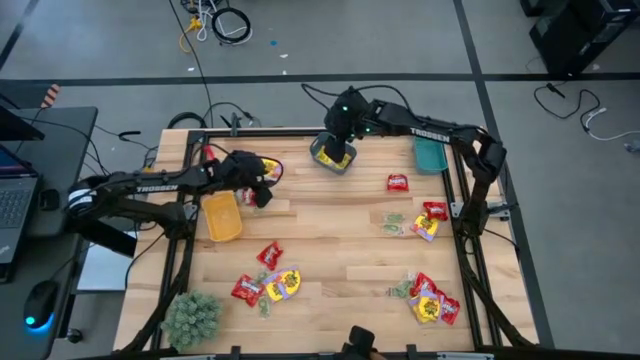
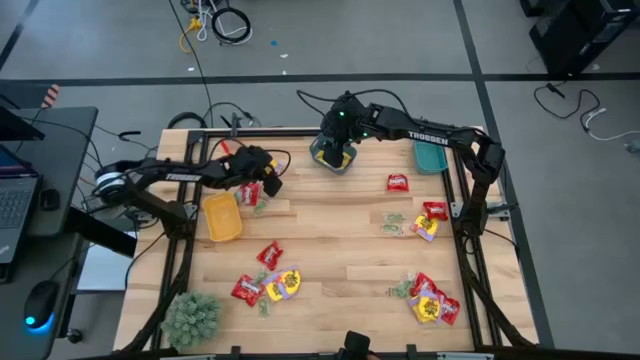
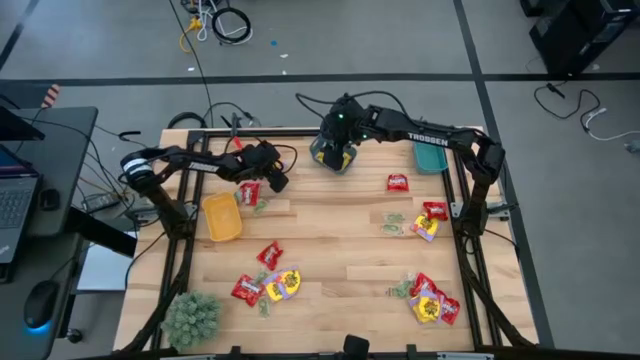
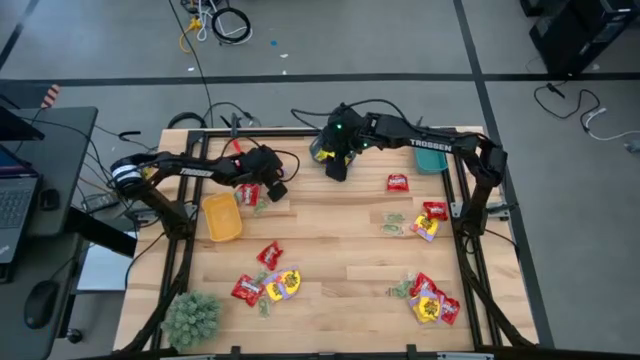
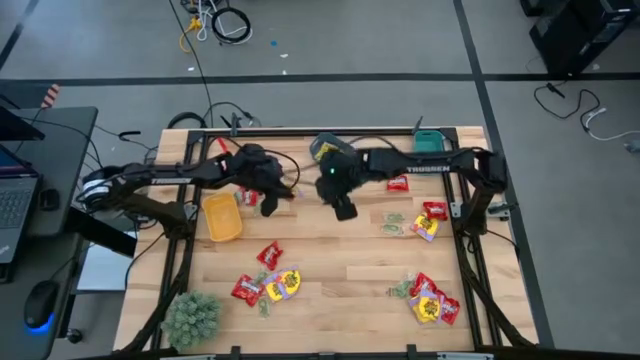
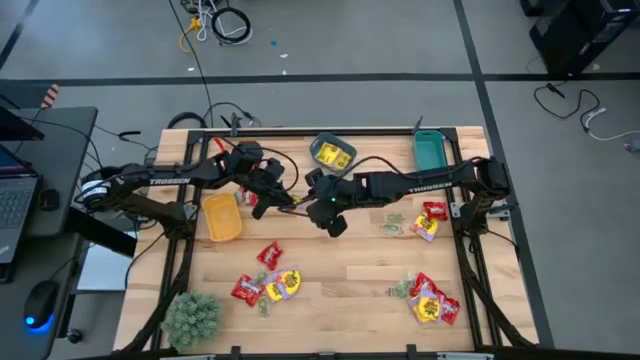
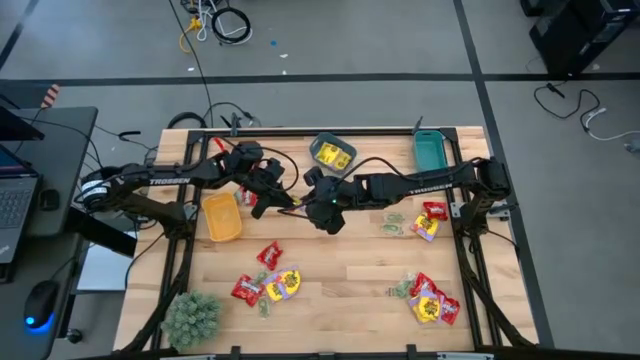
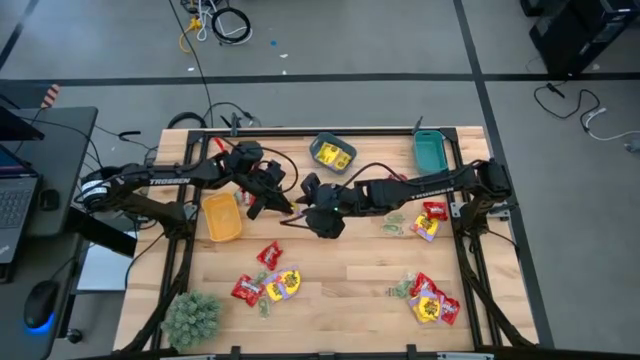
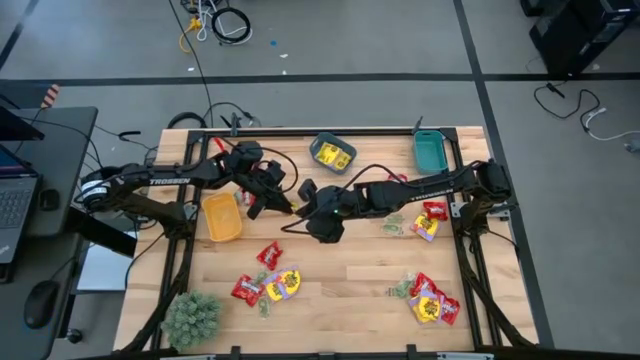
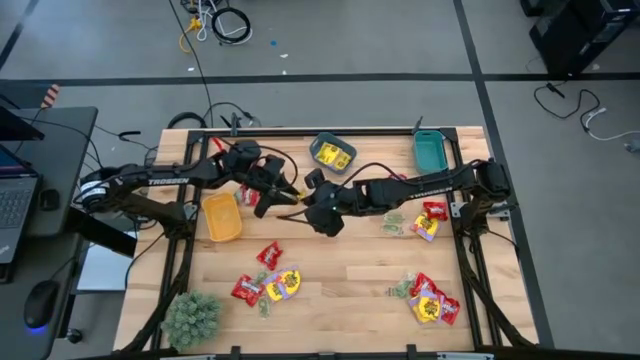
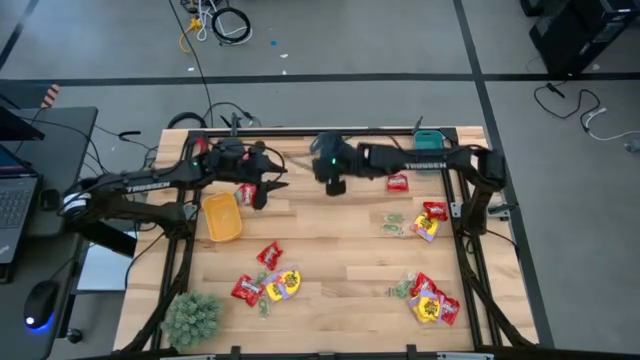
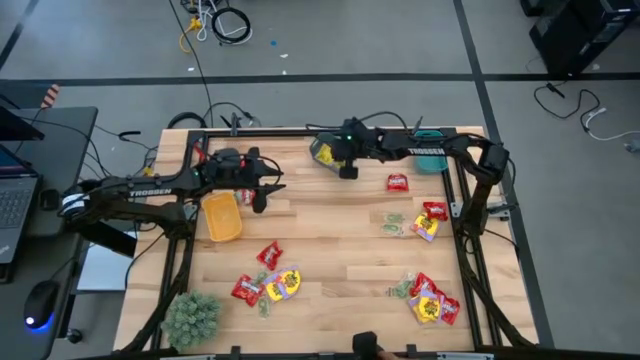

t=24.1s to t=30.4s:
Task: Sort candy
Put the yellow candy into the blue bin

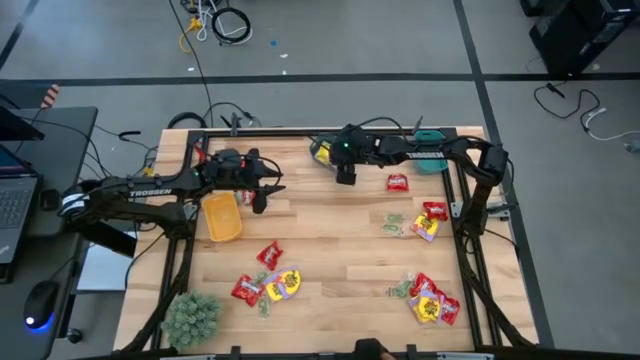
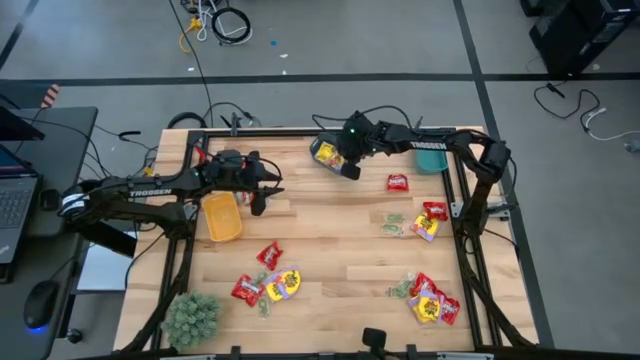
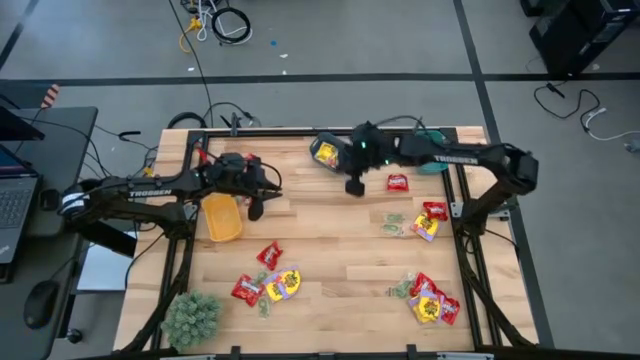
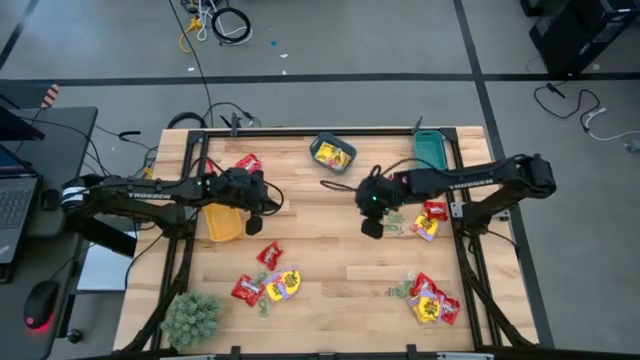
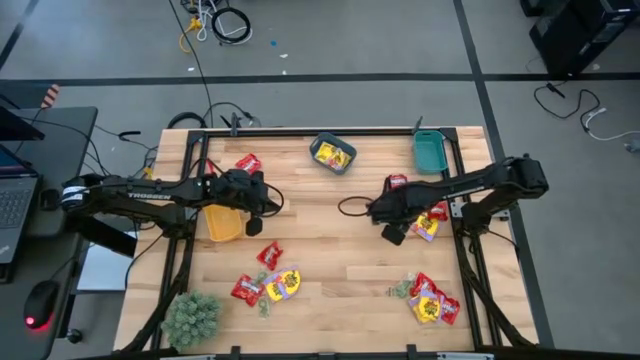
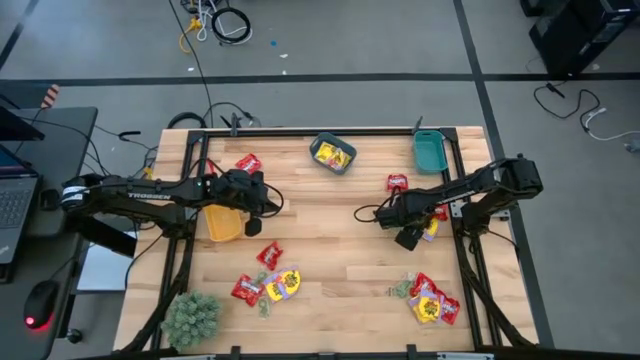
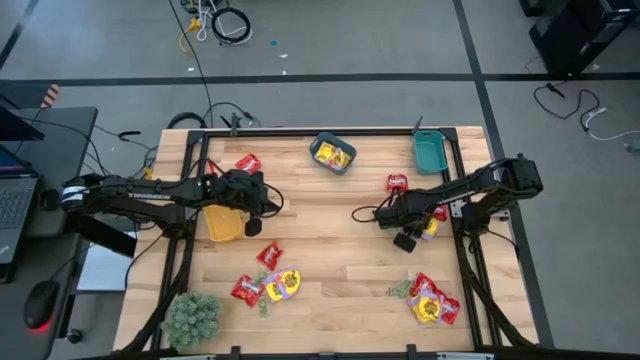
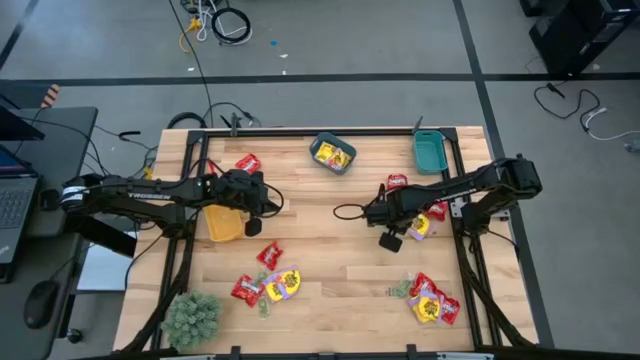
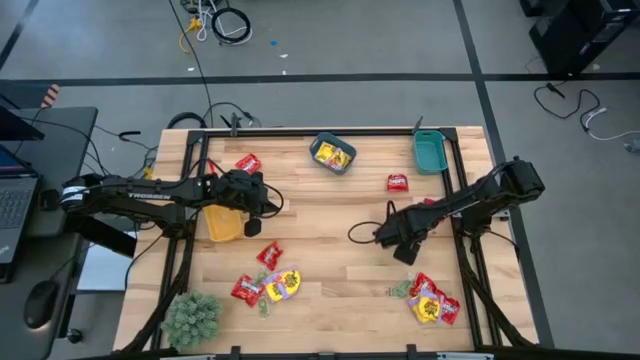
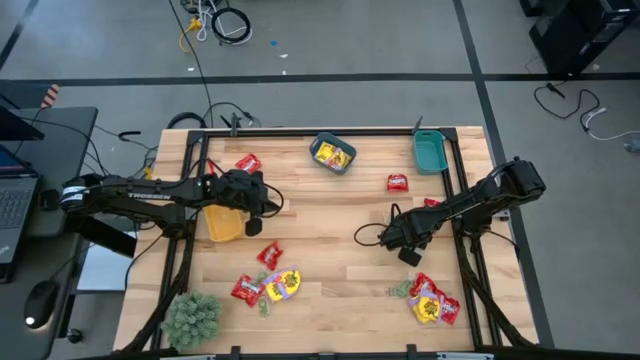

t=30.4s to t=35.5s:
Put the yellow candy into the blue bin

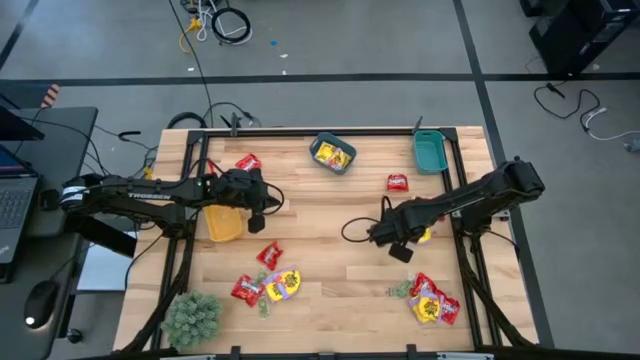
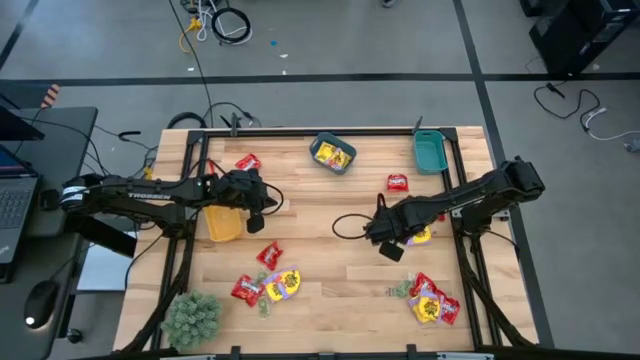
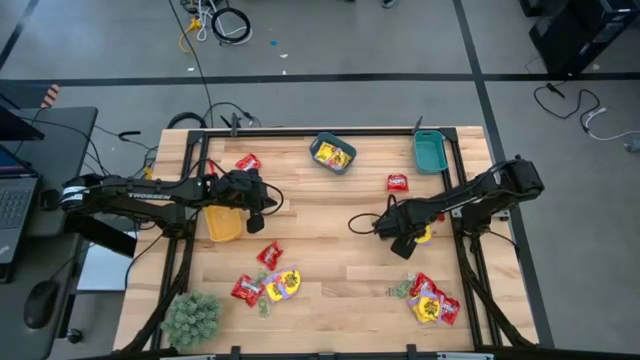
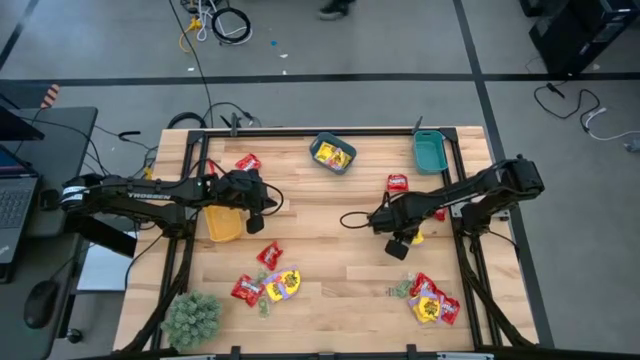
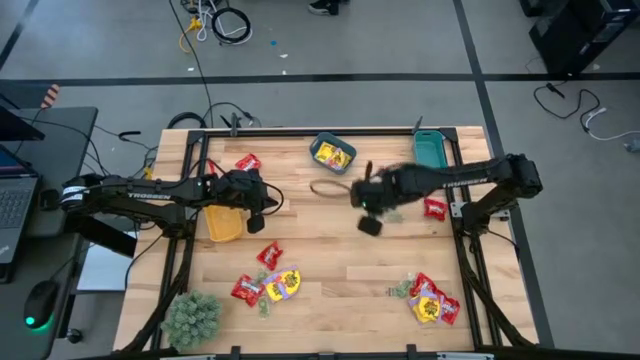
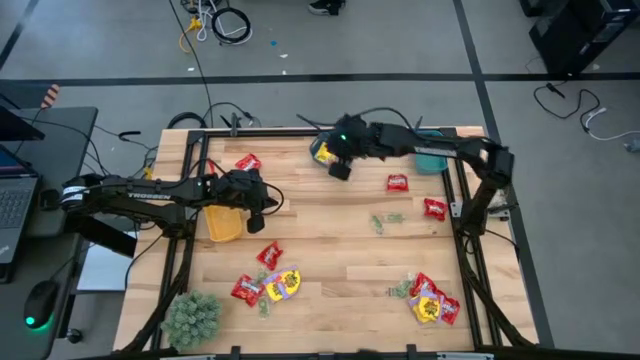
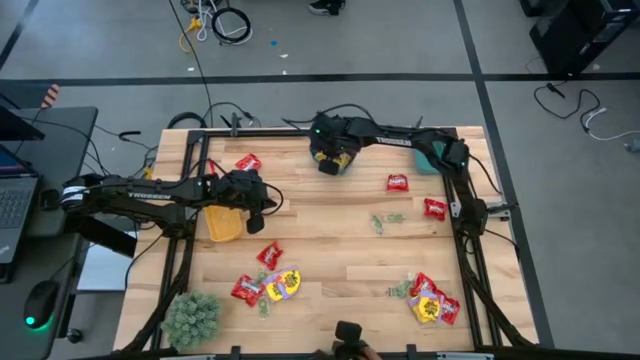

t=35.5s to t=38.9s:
Put the yellow candy into the blue bin

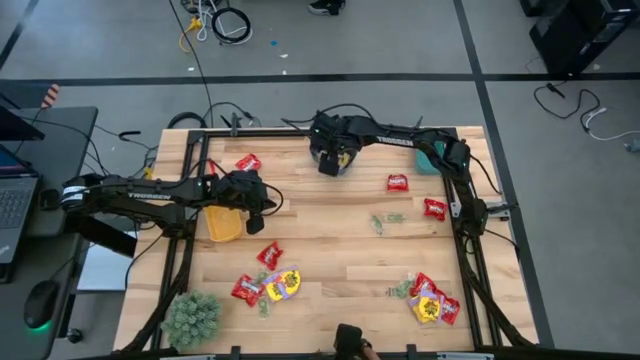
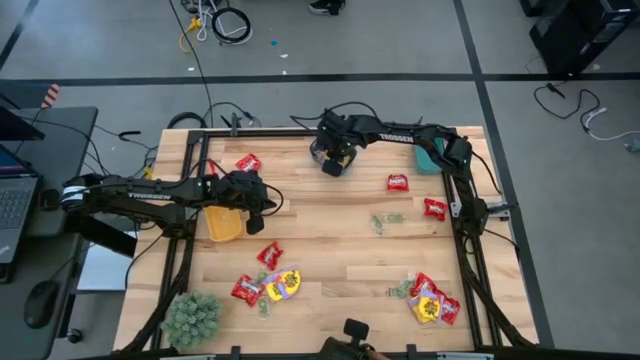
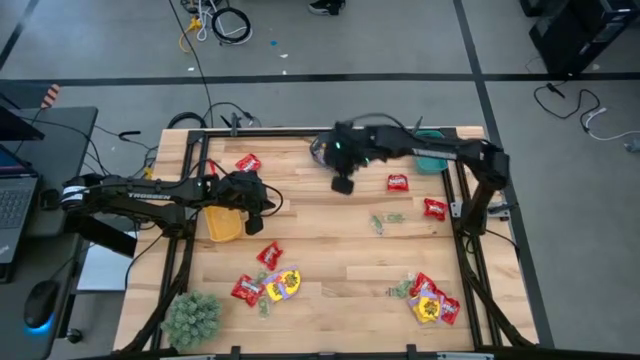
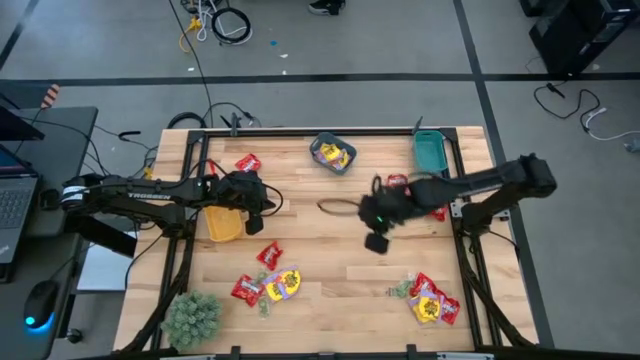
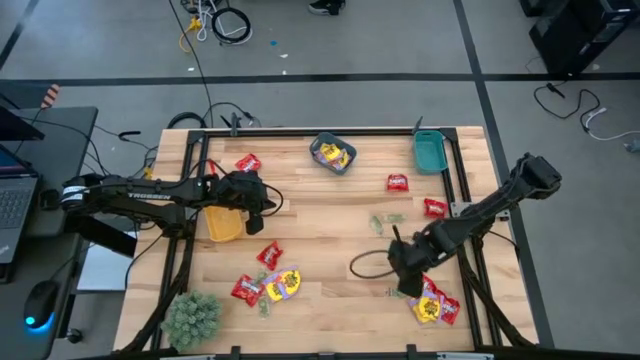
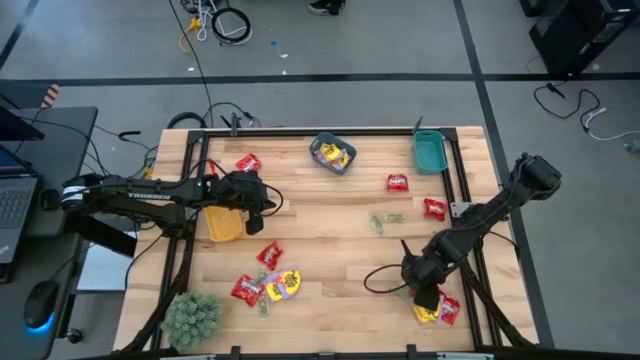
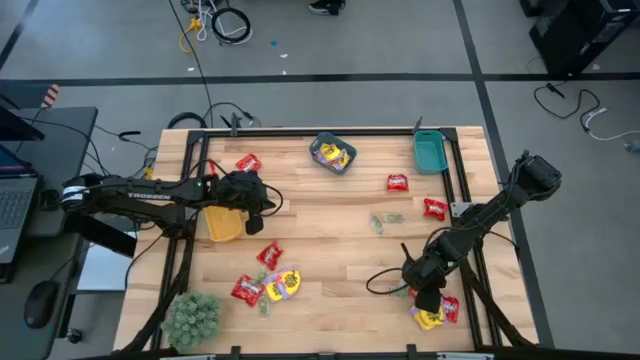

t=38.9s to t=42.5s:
Put the yellow candy into the blue bin

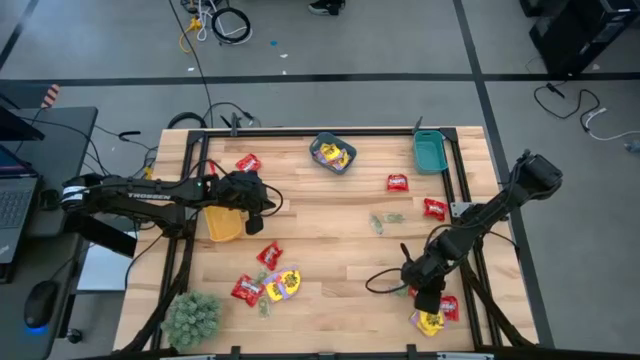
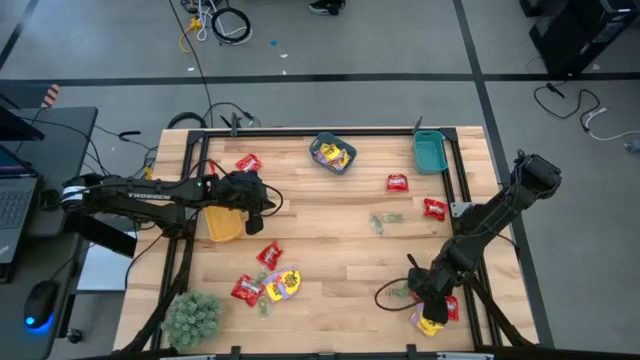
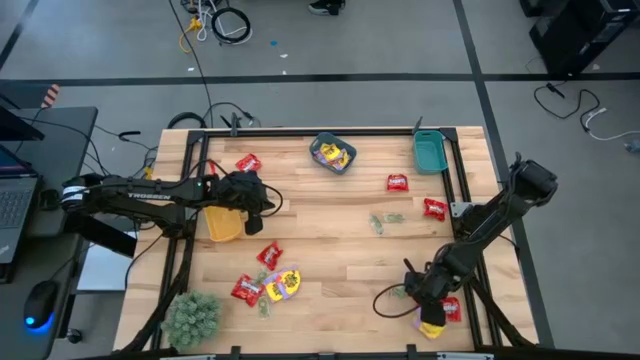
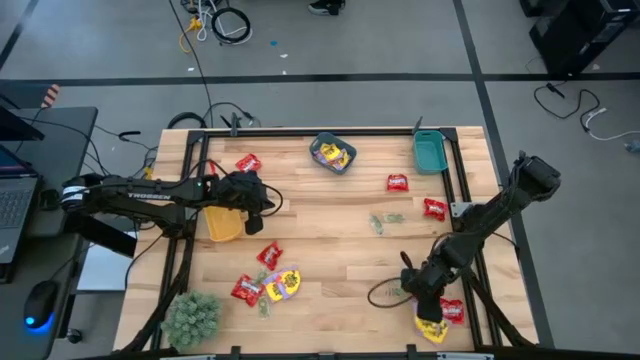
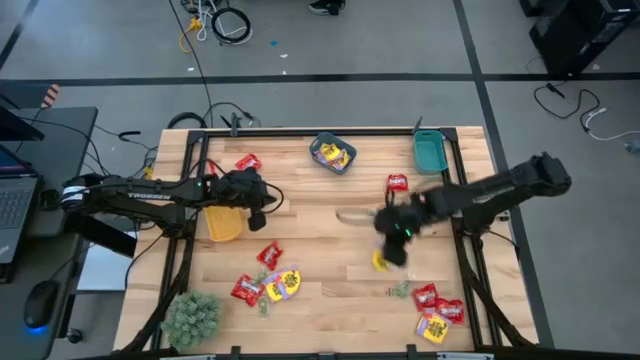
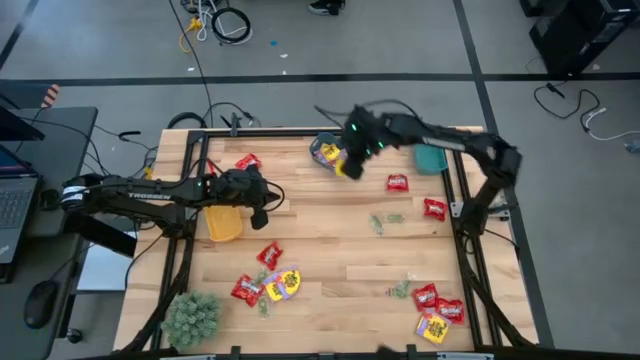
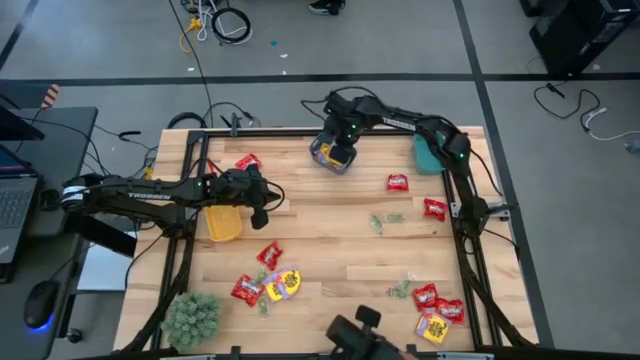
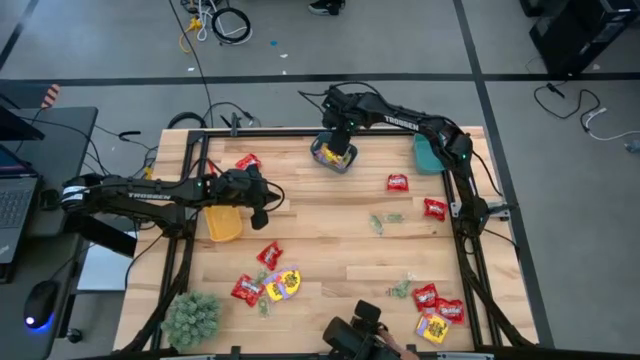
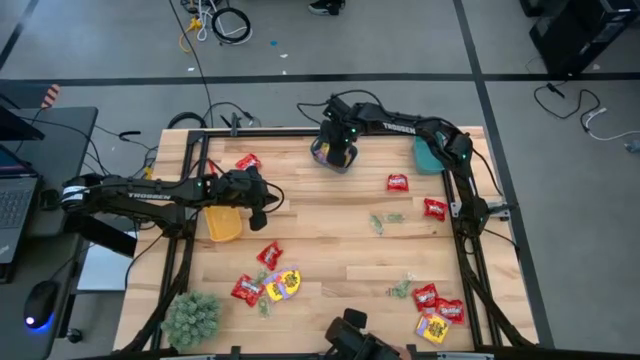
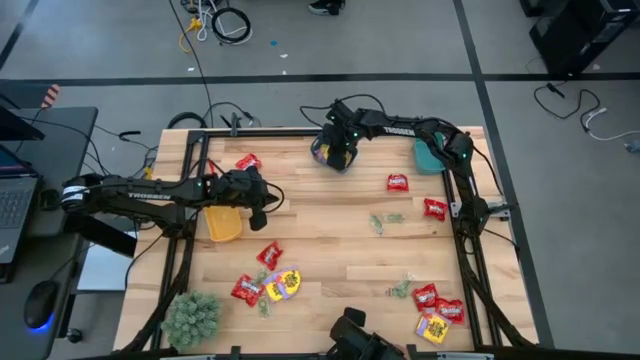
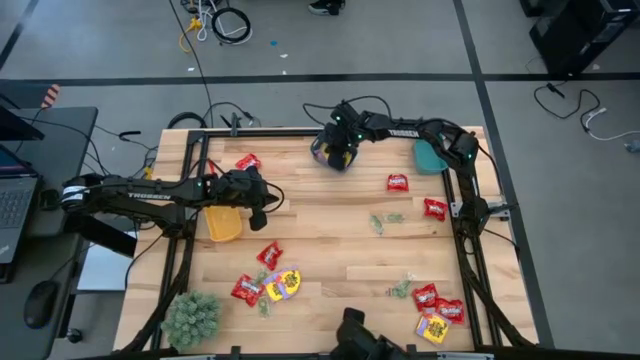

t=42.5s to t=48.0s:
Put the yellow candy into the blue bin
